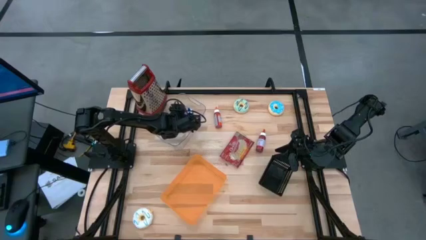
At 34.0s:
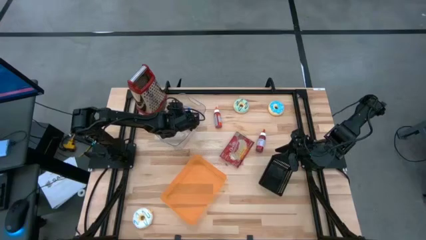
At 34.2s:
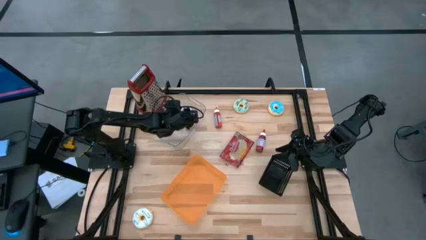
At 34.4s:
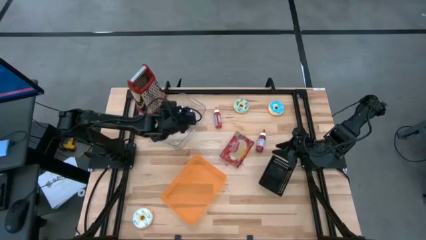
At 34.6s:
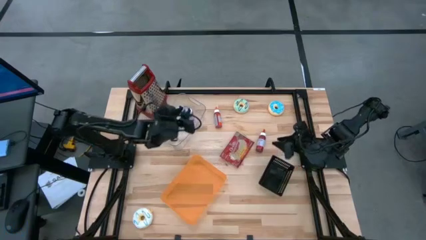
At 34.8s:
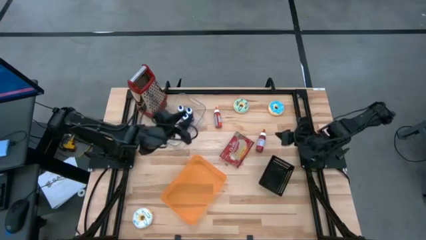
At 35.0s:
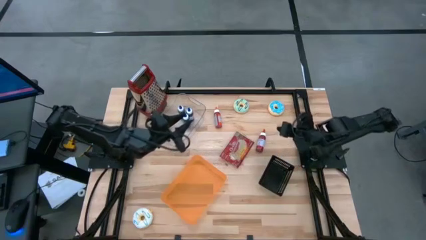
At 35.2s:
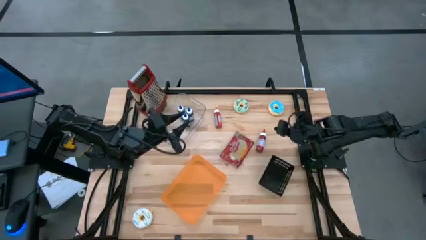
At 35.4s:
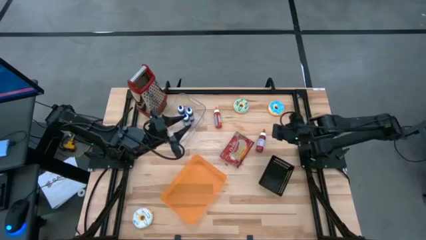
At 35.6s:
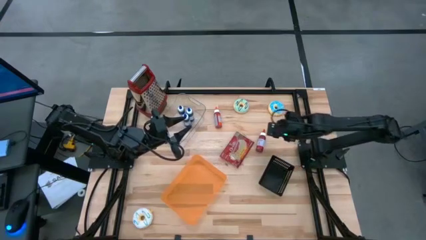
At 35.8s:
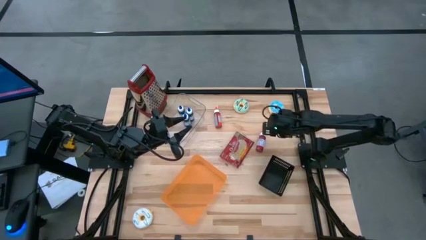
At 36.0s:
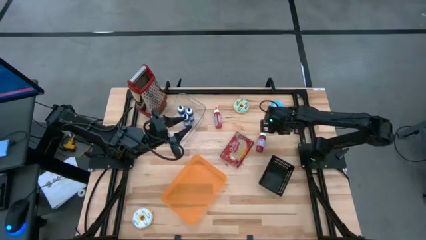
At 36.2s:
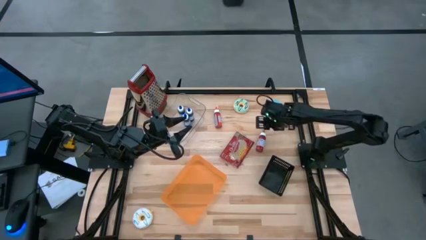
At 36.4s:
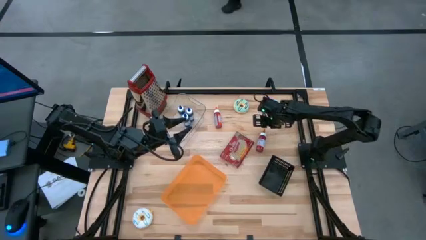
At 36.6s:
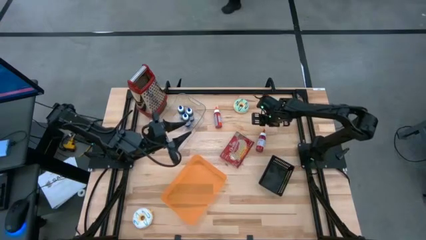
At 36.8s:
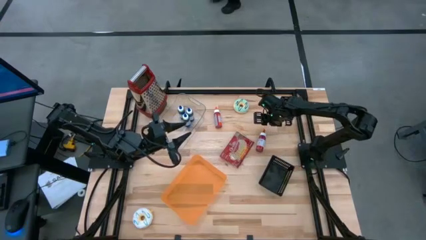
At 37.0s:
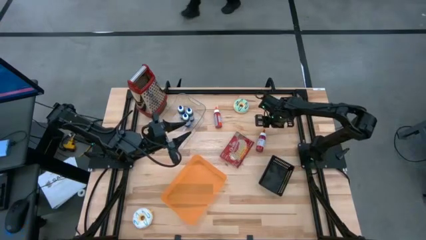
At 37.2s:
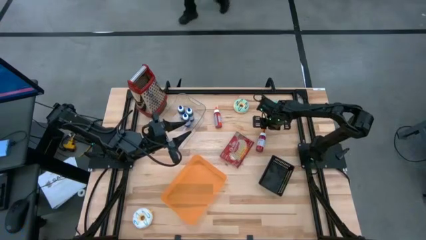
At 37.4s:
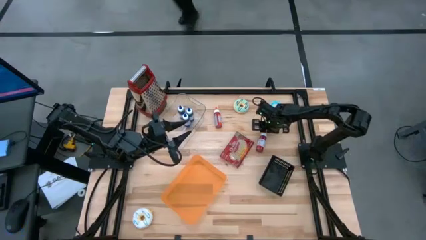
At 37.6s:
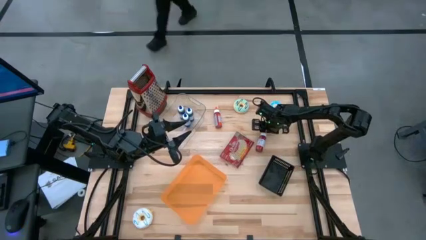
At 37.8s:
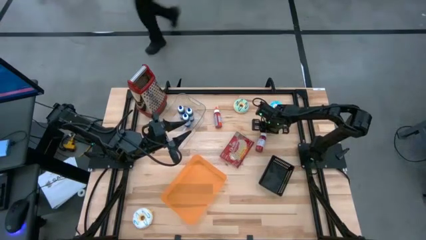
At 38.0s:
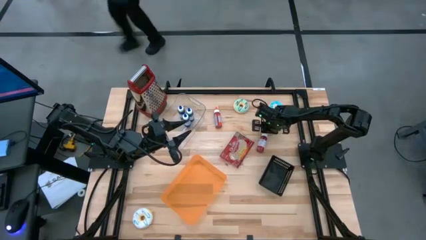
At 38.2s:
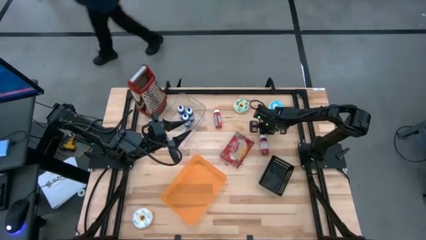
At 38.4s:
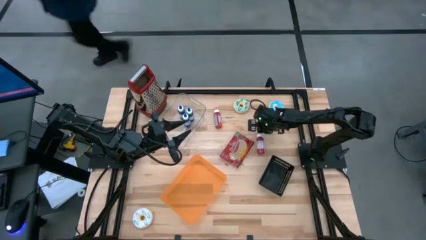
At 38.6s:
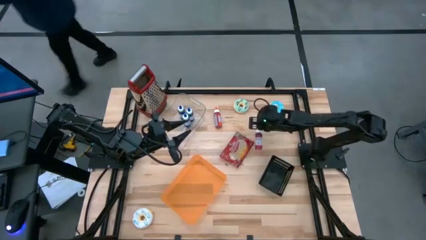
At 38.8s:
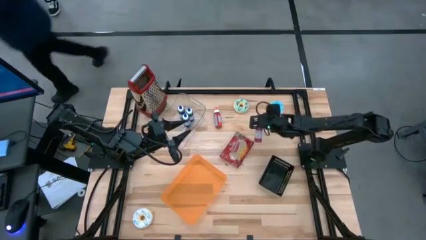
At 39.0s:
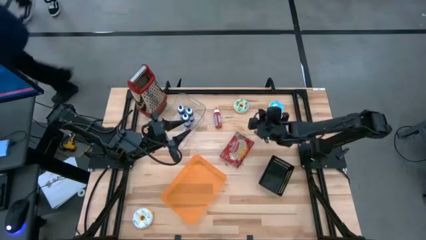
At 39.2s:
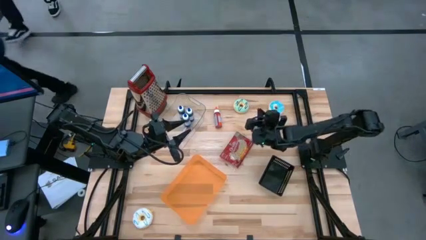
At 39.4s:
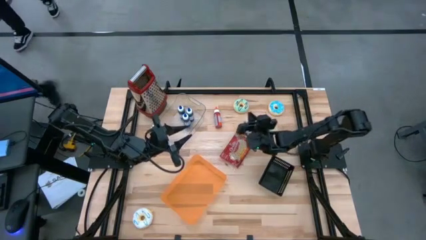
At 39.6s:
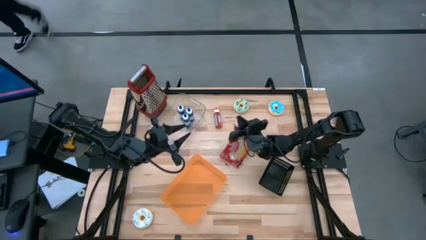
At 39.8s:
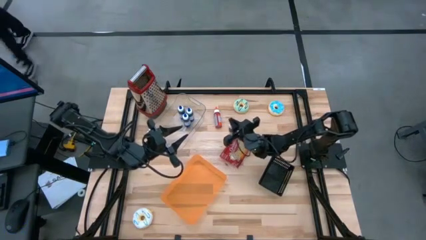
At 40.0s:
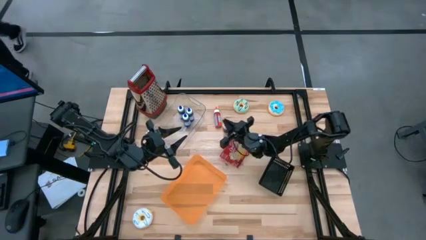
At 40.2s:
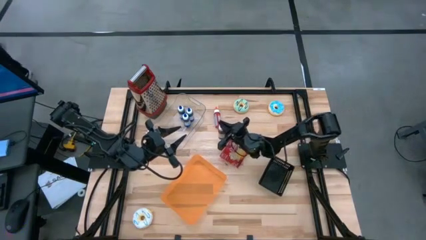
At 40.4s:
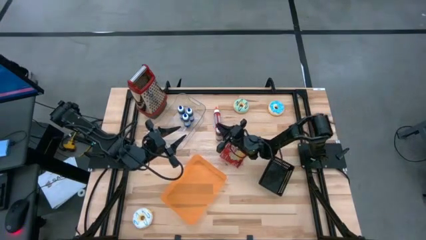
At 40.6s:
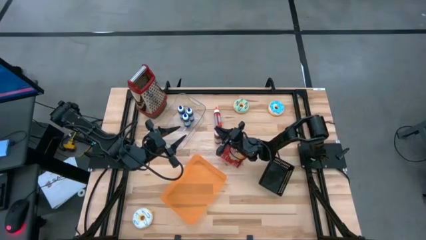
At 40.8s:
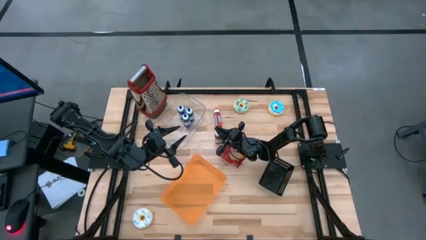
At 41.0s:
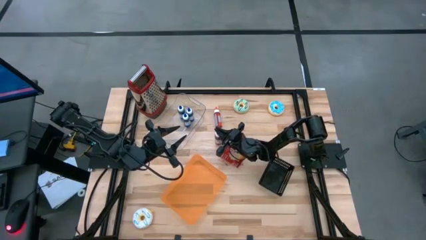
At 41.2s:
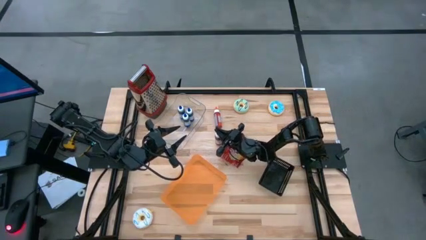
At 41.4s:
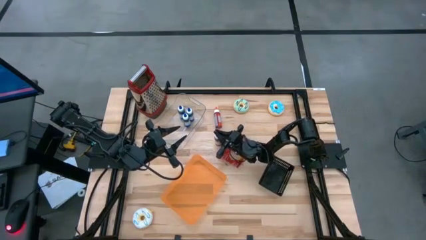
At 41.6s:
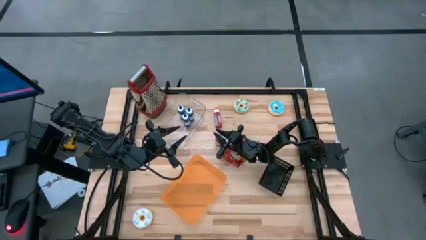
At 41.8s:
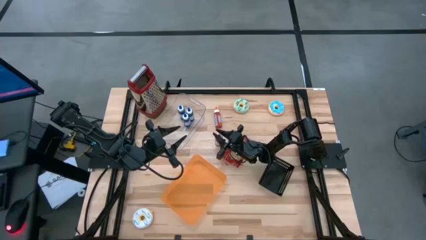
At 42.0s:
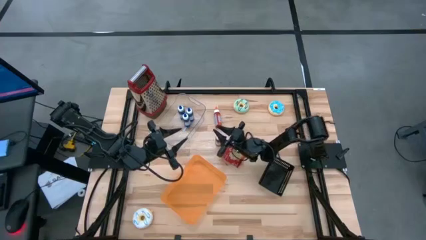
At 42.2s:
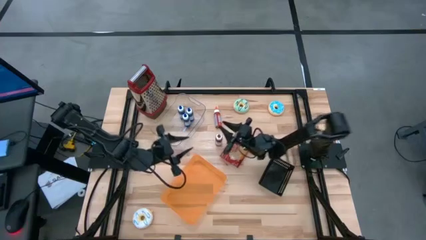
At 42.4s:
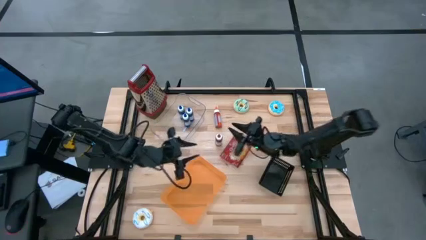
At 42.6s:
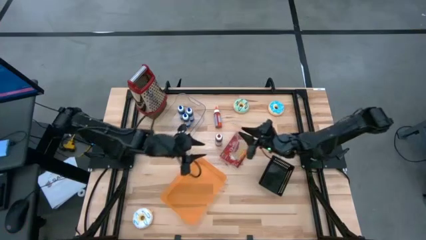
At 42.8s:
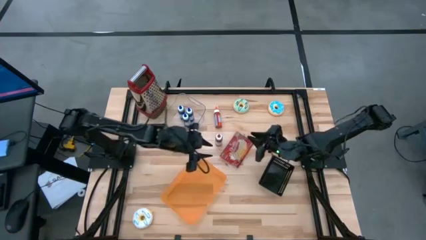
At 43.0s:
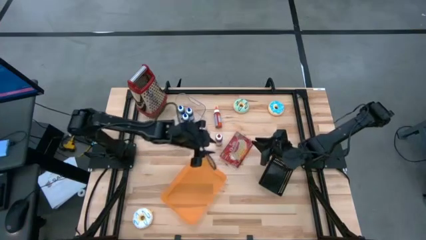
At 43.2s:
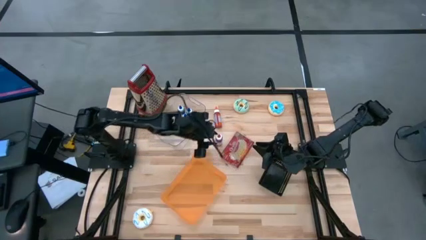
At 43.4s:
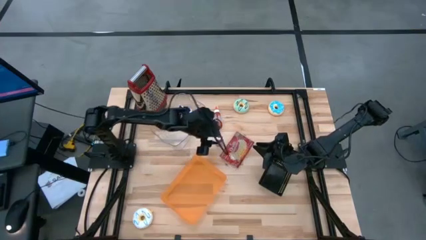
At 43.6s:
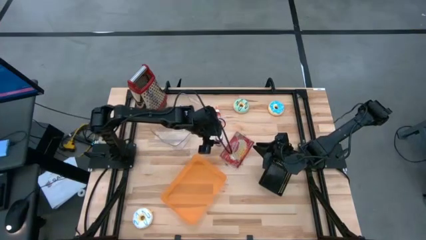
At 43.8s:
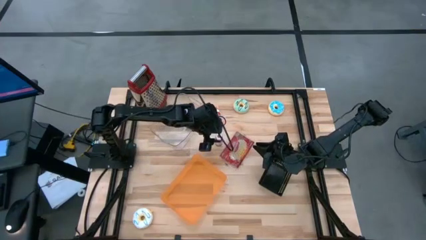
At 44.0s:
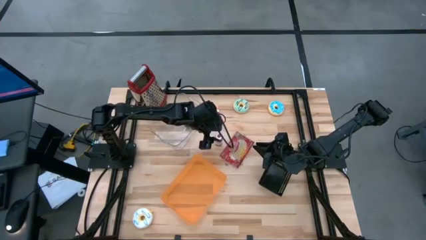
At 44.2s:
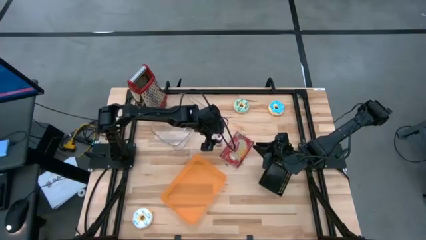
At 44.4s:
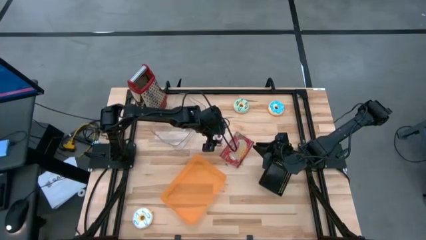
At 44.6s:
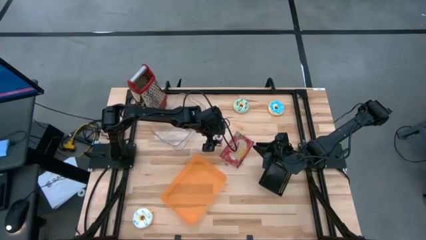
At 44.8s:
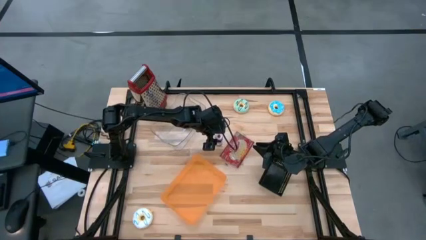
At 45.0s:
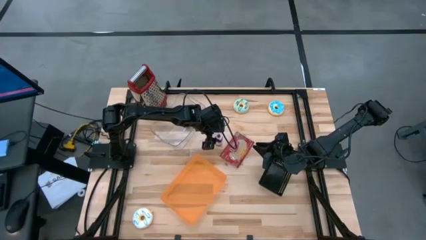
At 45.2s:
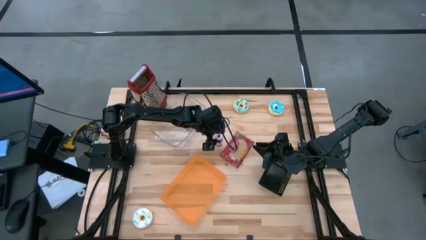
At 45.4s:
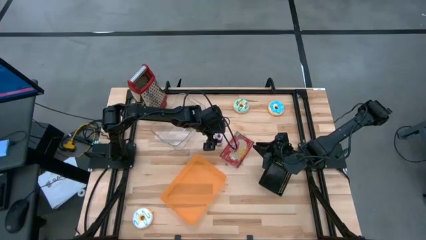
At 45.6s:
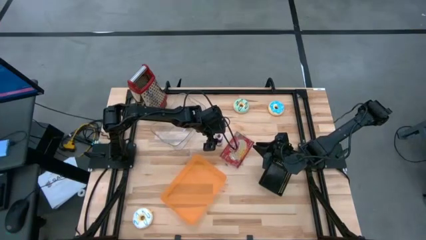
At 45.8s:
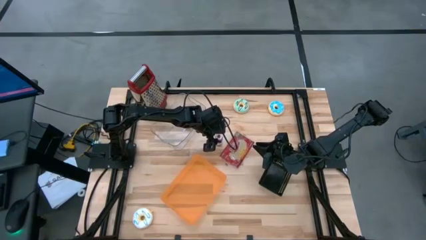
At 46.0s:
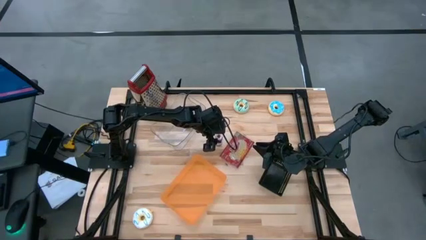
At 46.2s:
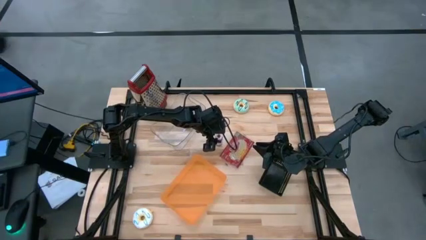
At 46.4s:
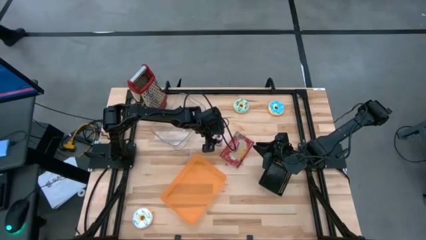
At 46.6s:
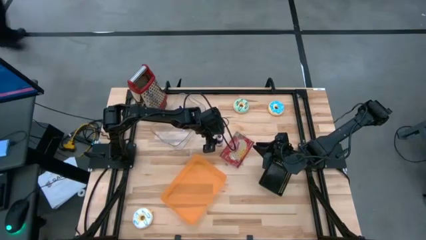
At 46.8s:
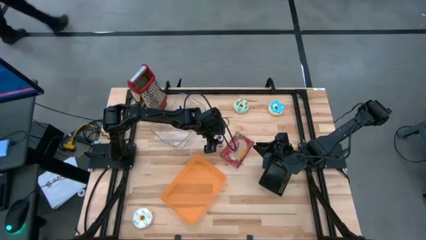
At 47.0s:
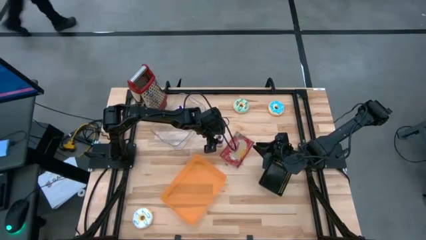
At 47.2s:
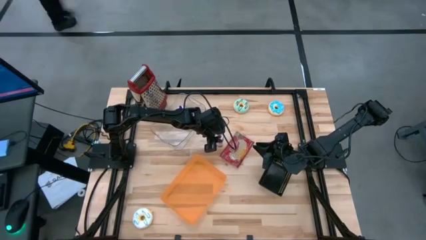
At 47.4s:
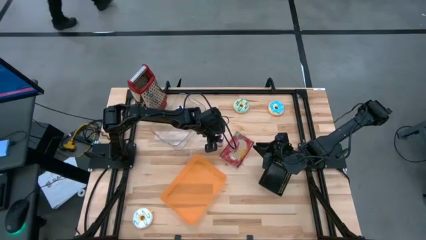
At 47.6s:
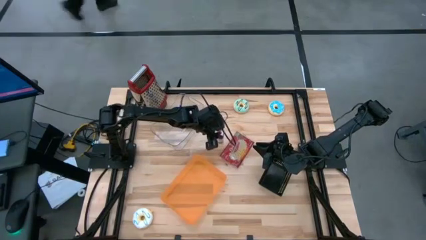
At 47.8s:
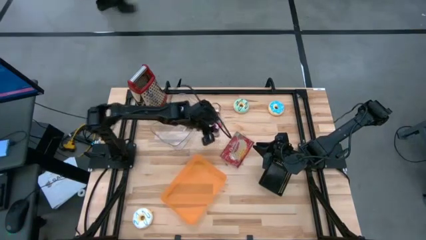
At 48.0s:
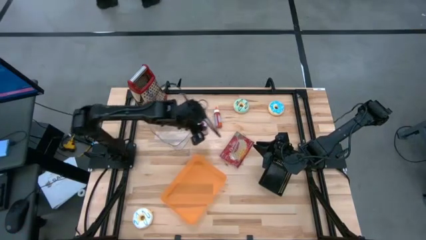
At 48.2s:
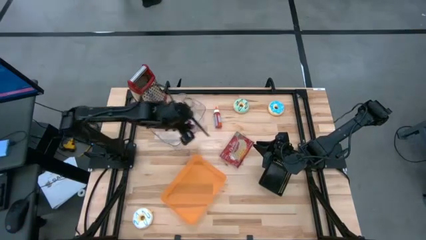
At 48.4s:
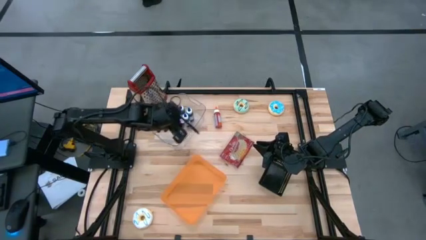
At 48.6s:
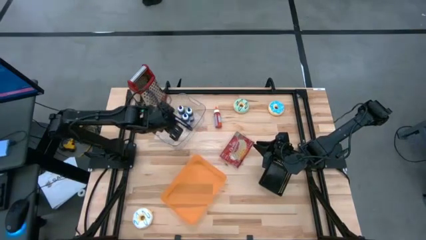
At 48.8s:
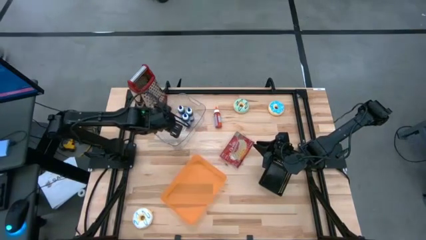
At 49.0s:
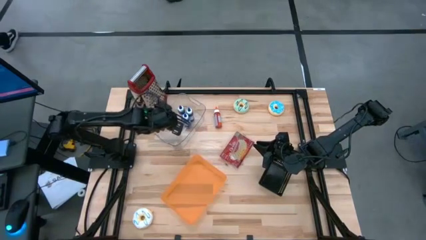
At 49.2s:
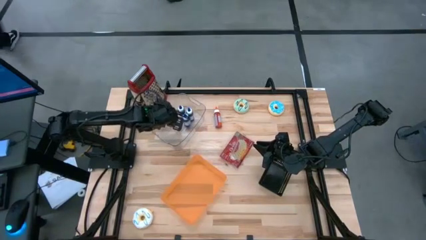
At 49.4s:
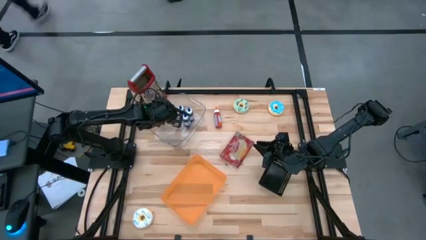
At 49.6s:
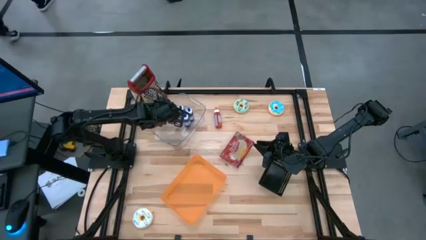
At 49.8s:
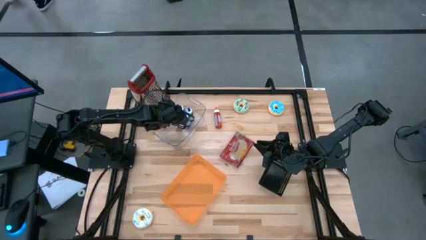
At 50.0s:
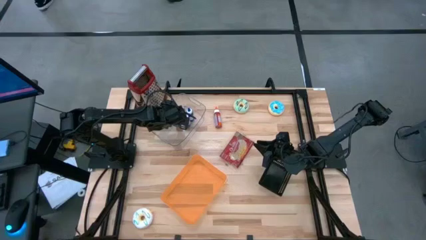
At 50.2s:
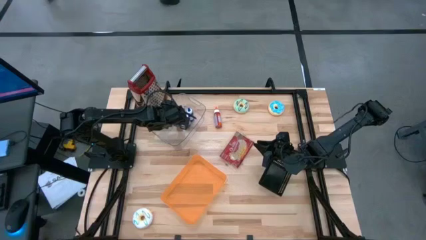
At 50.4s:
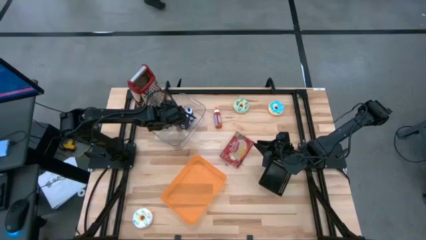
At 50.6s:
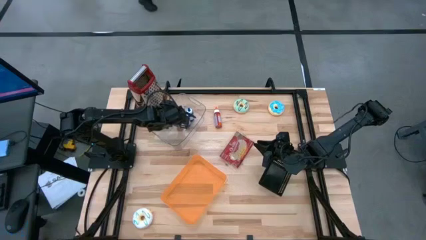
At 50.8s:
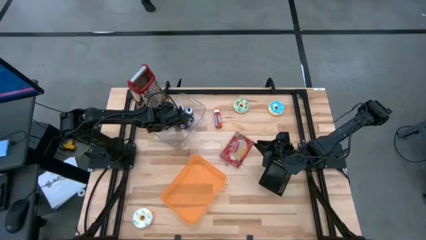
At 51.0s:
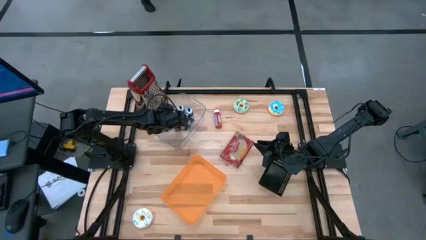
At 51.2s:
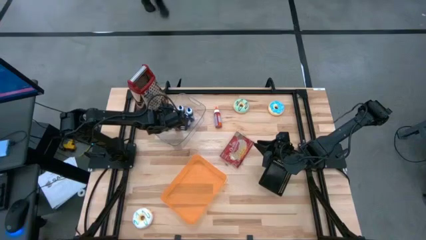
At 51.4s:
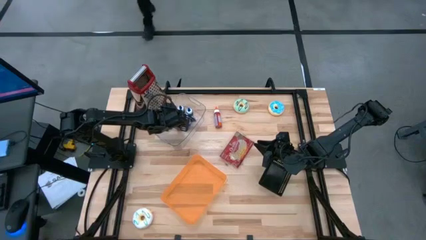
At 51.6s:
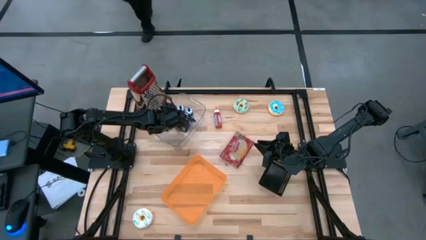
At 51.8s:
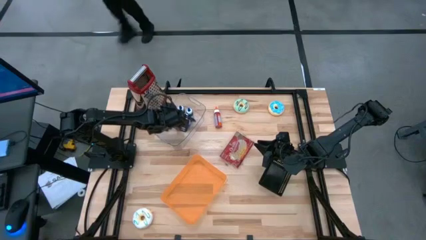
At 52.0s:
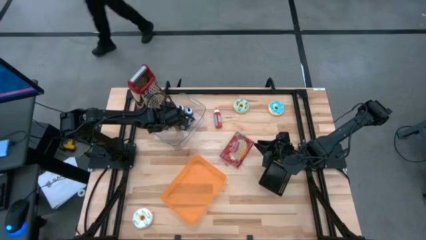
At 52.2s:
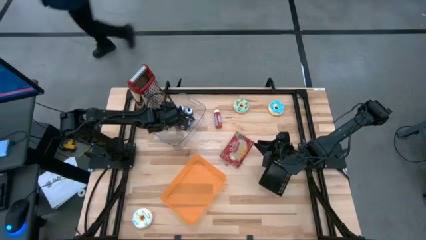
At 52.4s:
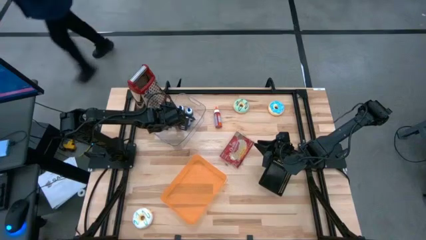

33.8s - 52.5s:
Put the red food coloring bottle into the transparent bin
